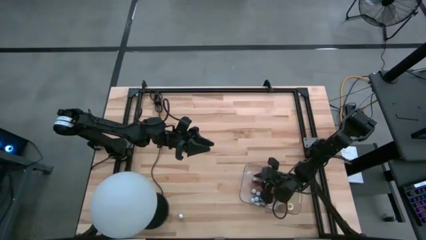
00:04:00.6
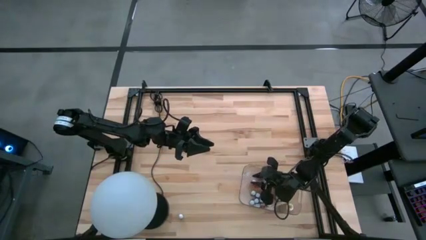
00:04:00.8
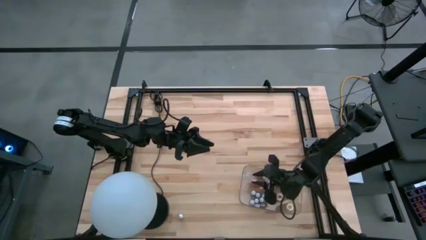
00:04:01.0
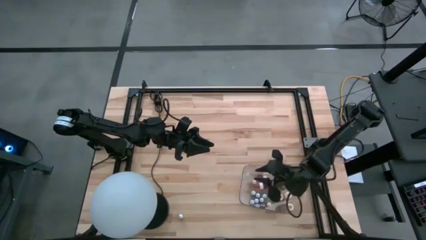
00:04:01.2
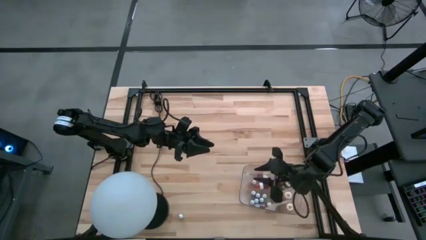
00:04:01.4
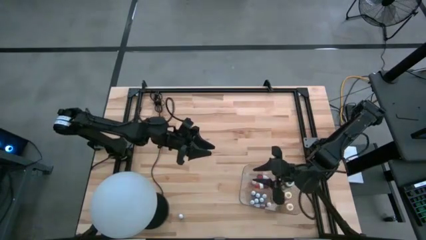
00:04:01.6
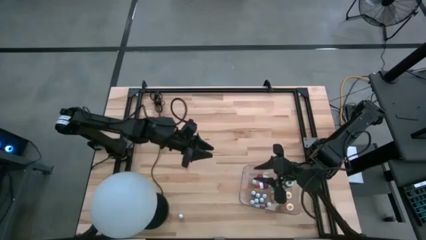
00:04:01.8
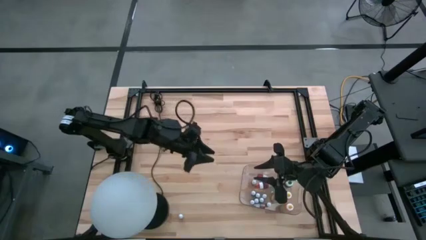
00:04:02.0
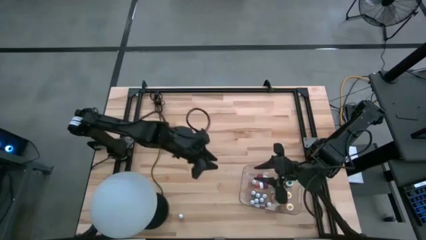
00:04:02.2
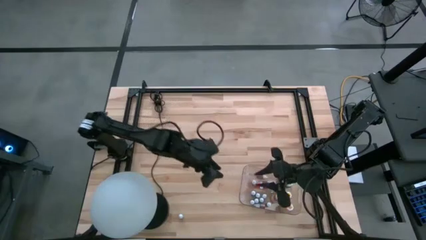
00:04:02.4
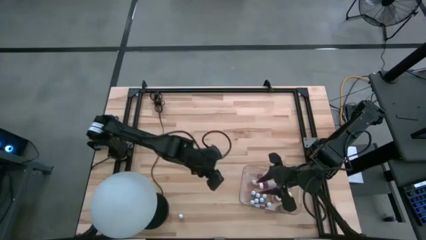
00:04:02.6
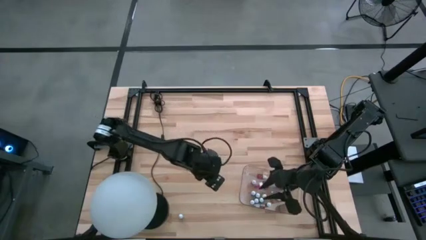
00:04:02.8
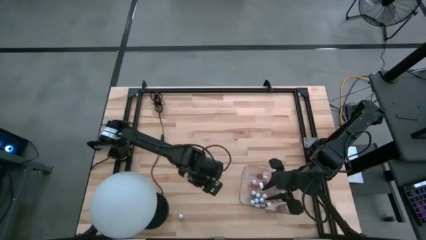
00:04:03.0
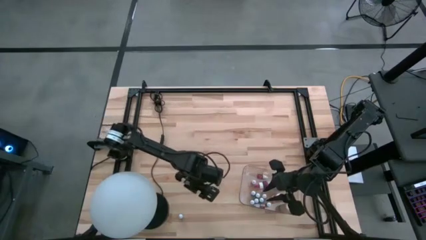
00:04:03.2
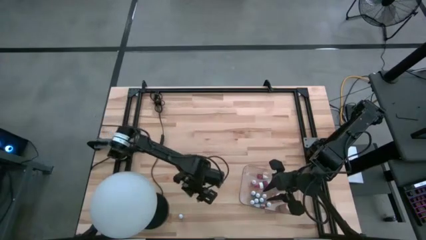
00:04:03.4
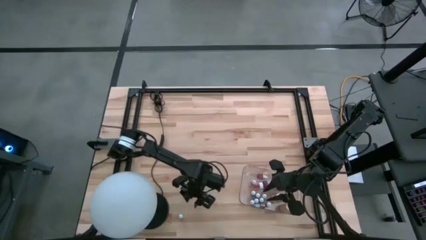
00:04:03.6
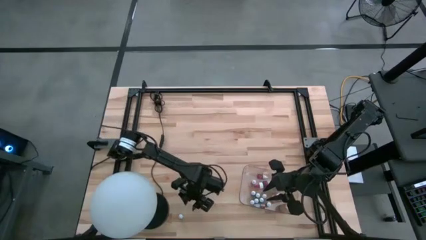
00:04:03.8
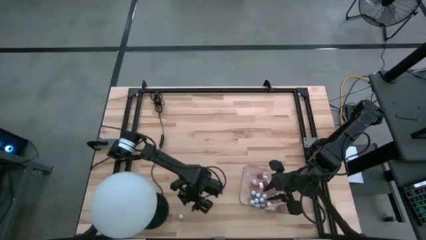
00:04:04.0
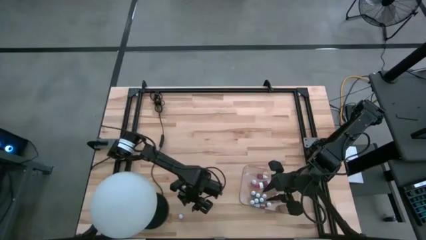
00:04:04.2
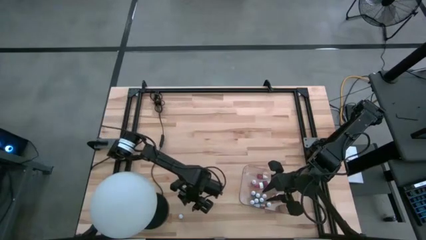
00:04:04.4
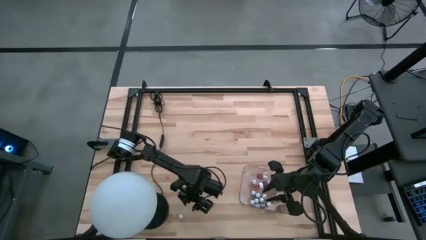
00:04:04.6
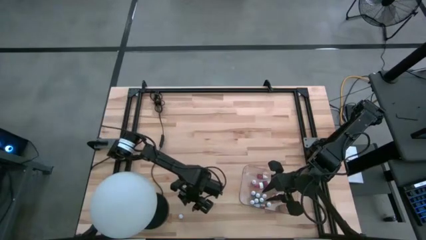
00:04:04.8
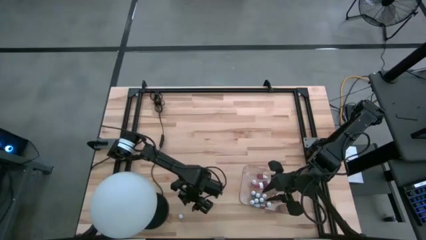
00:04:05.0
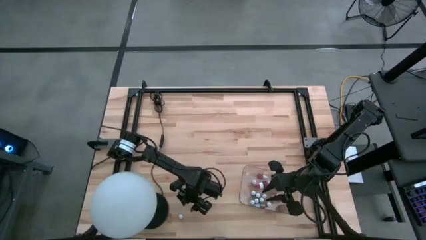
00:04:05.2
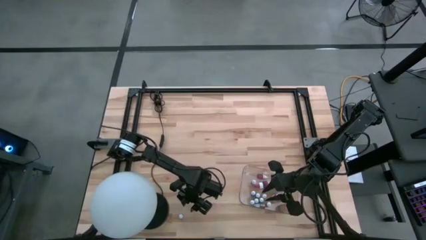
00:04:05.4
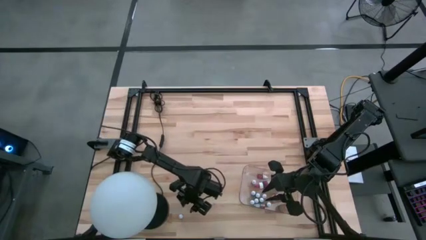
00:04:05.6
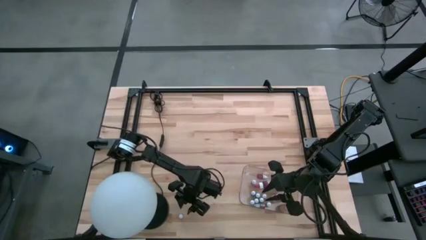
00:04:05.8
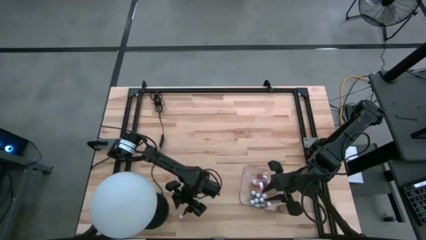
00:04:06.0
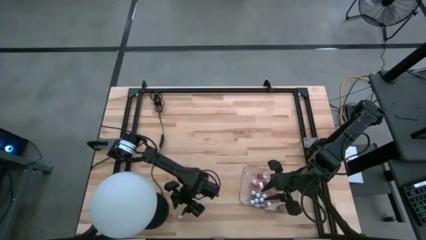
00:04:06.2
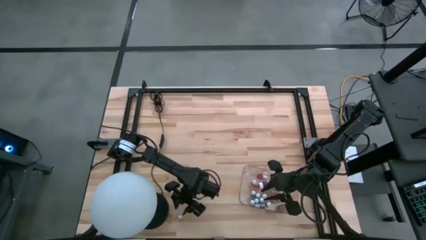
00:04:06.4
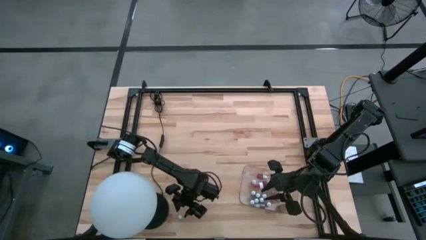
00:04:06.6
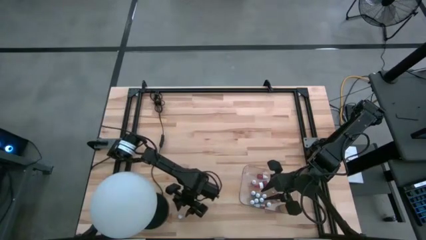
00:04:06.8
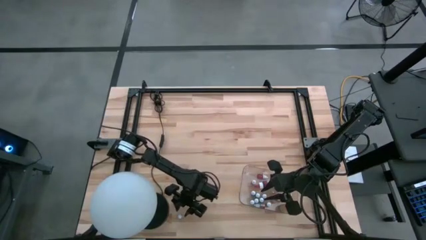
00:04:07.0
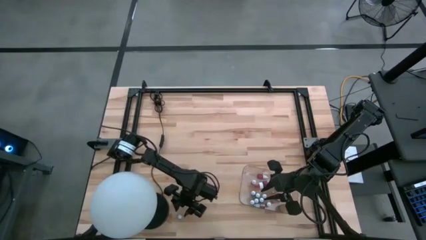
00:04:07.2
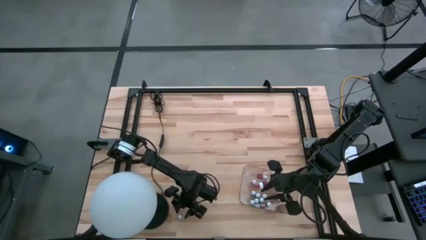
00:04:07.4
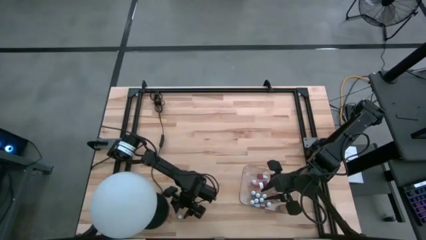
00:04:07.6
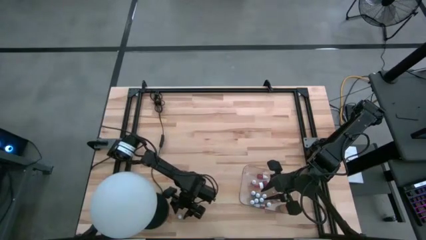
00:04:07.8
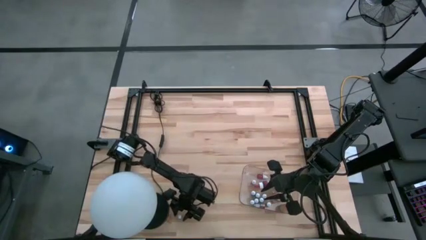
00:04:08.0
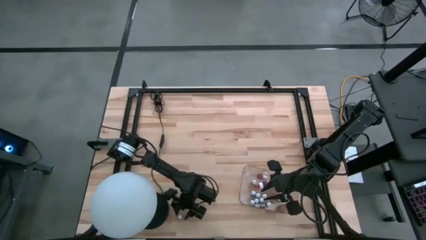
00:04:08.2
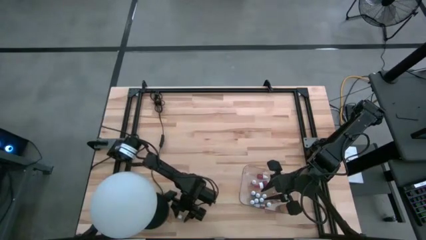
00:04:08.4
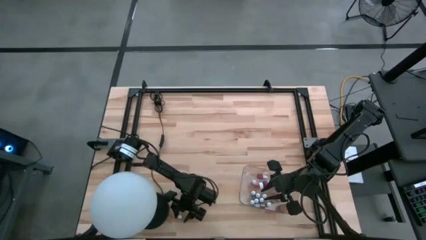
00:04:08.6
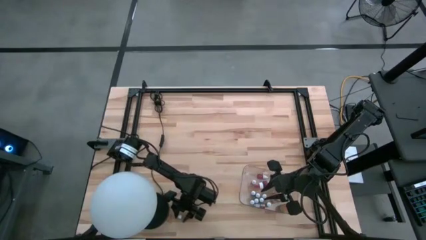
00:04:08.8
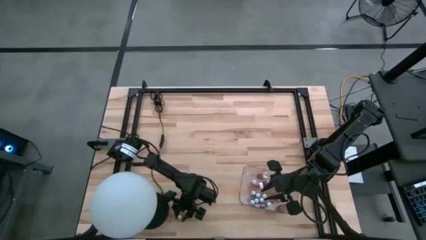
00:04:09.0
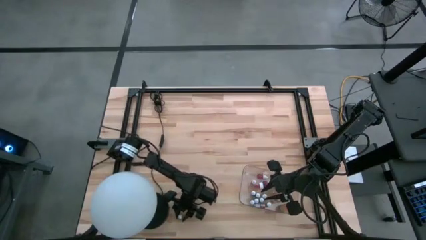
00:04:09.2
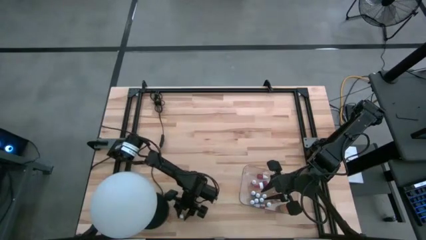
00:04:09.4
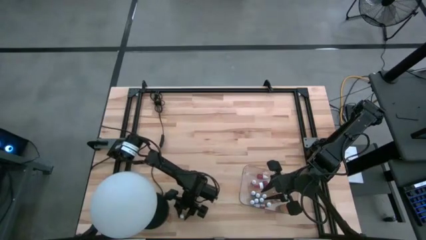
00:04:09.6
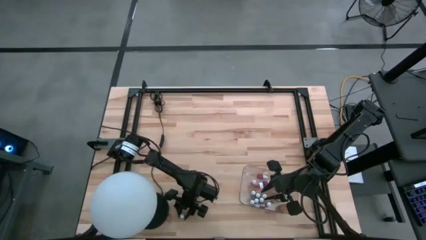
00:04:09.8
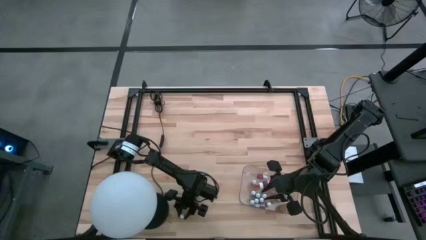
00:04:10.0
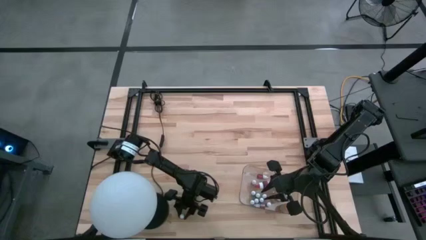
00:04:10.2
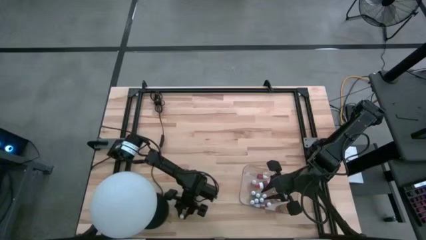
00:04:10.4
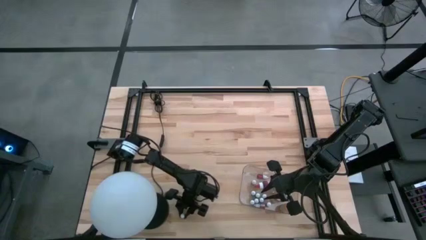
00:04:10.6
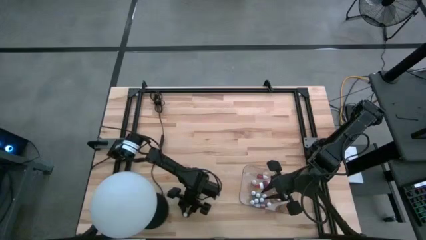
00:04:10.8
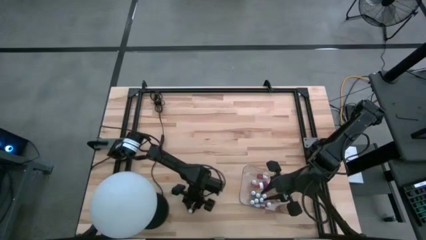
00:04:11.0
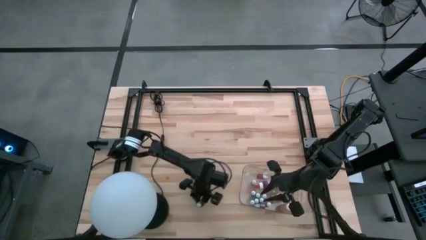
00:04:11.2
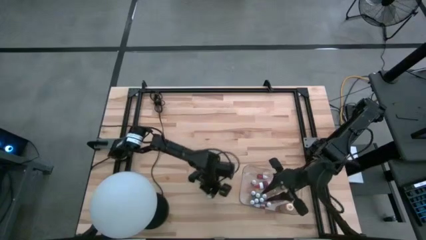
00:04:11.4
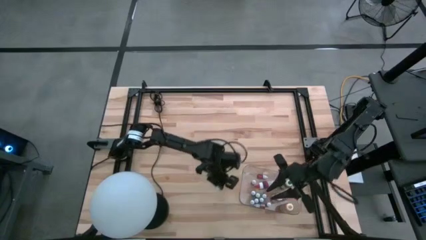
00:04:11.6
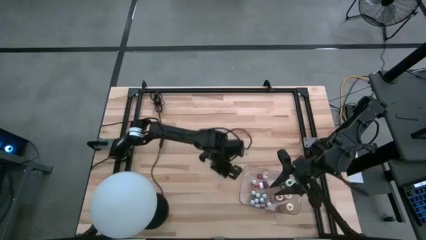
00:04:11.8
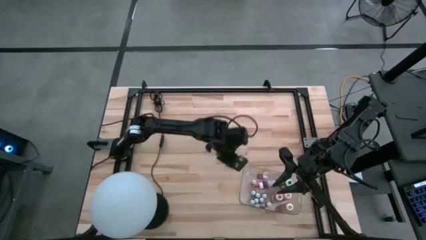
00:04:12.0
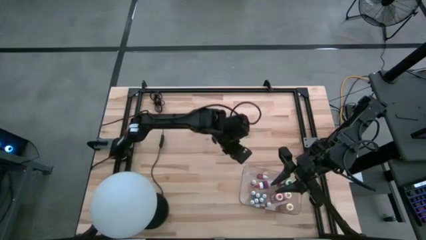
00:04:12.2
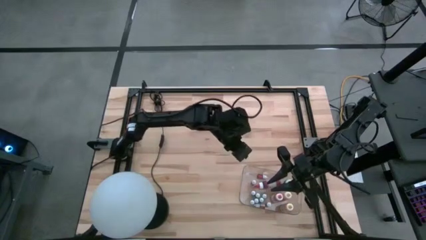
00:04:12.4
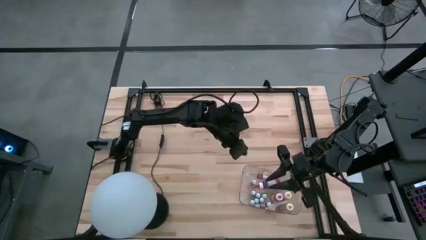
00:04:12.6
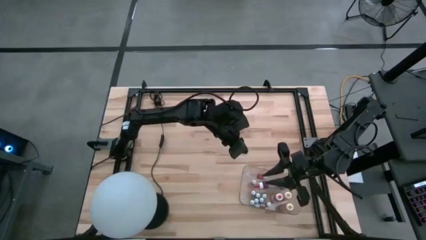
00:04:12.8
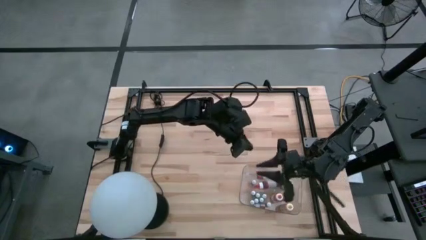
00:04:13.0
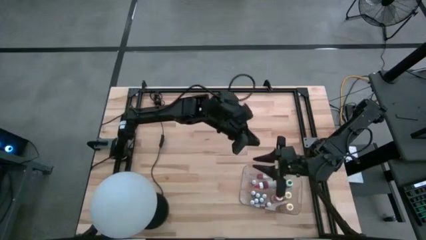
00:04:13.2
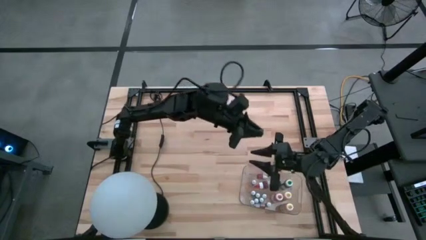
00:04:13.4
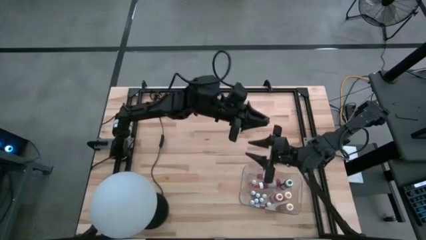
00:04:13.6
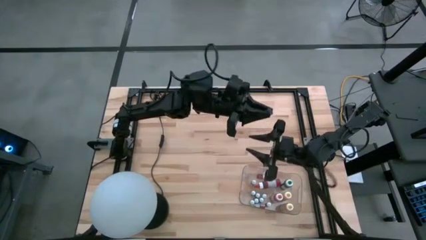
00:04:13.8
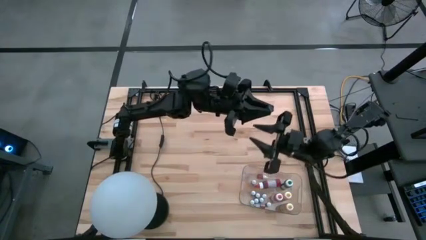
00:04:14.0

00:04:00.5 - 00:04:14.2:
Task: Pick & Place food coloring
Put the black food color into the transparent bin

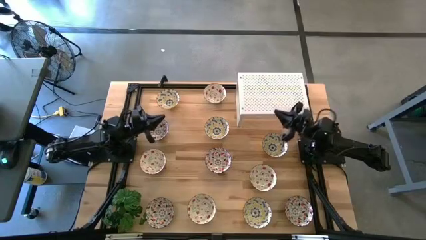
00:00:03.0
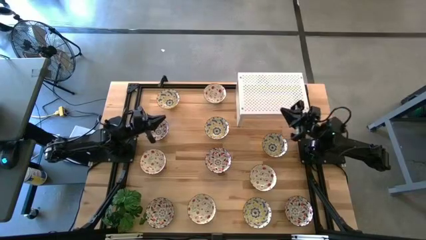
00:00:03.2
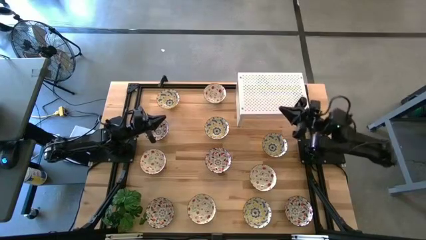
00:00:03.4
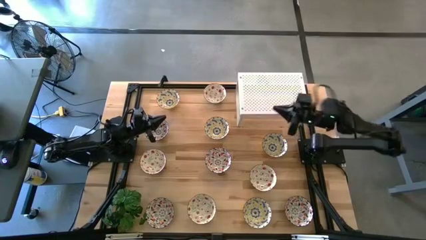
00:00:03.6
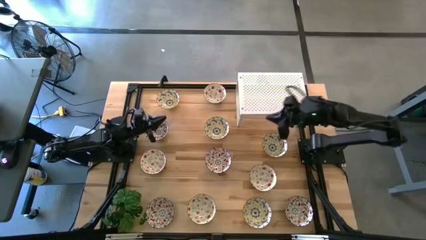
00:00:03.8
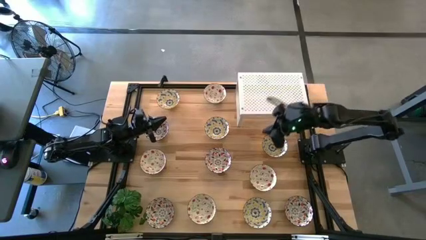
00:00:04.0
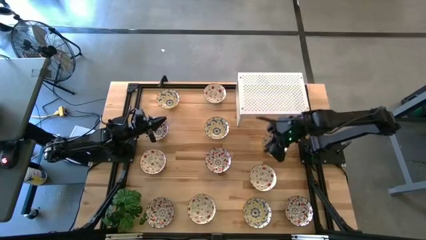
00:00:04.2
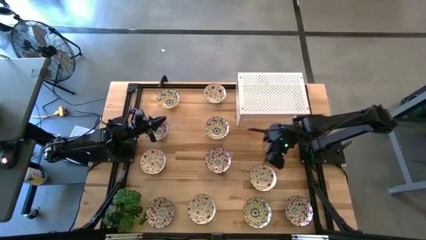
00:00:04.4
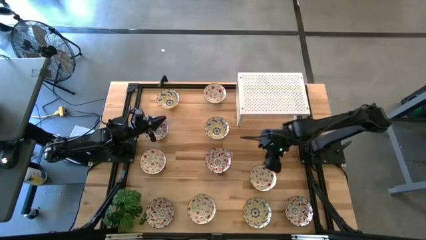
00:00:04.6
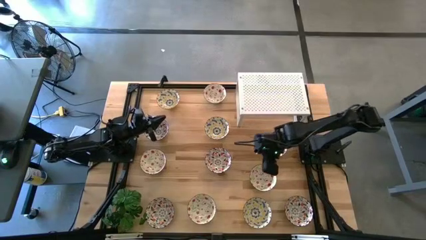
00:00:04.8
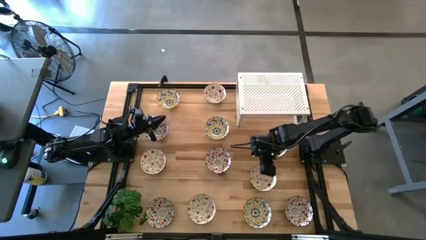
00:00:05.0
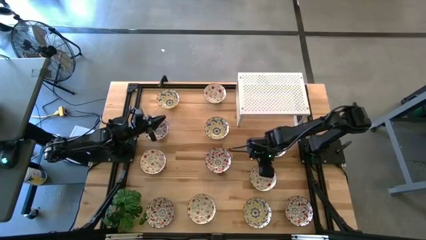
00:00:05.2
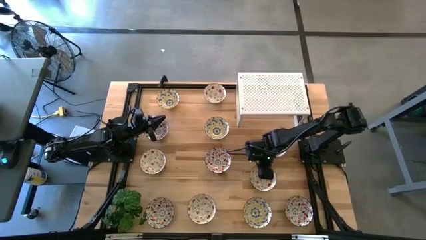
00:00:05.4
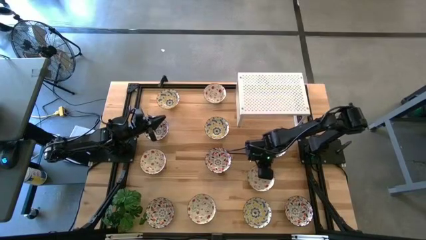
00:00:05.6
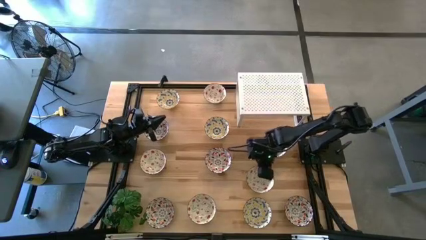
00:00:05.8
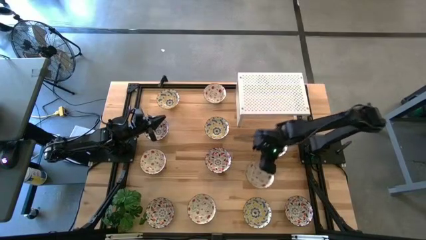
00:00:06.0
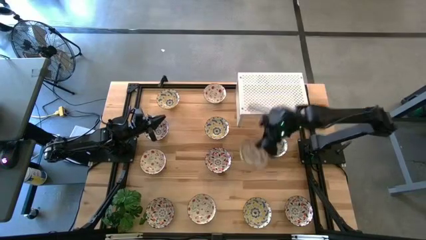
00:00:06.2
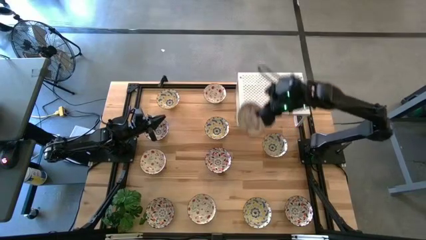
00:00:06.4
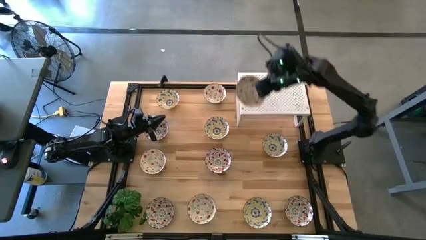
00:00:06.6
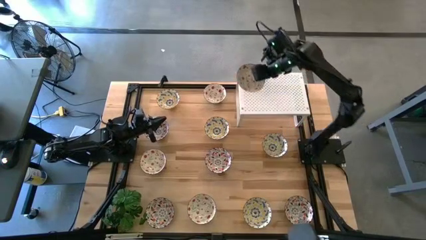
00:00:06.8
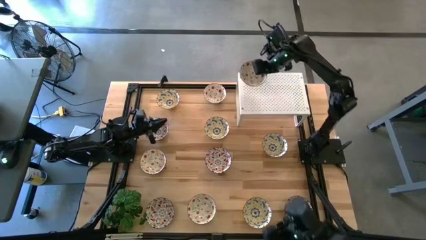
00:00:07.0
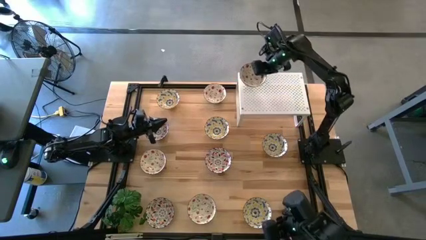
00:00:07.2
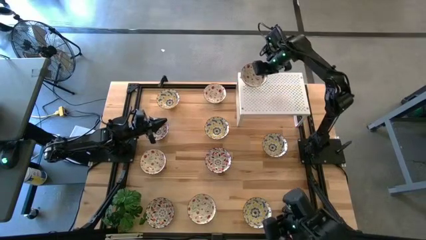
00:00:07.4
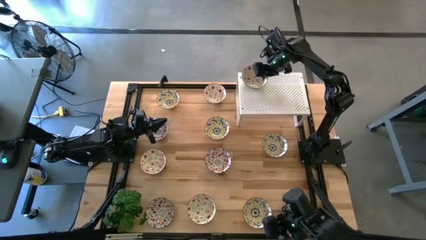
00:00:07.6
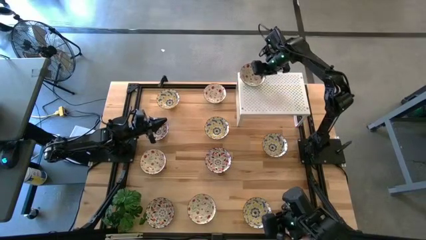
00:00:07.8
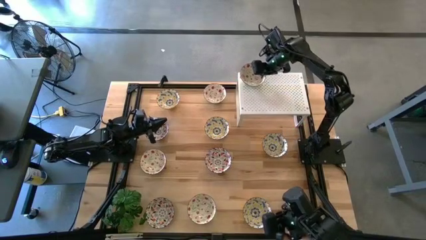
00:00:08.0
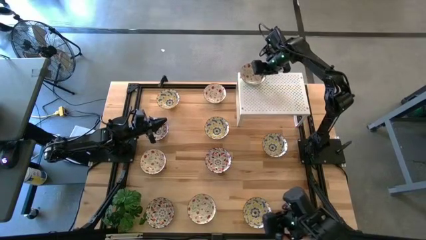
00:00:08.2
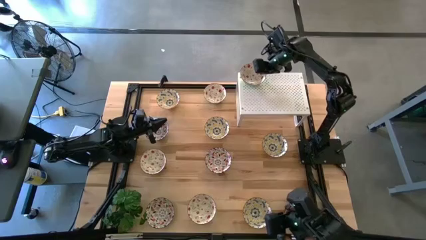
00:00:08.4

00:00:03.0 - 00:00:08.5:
Task: Pick & Place Mini bowls
Put the green patterned bowl on the shelf
